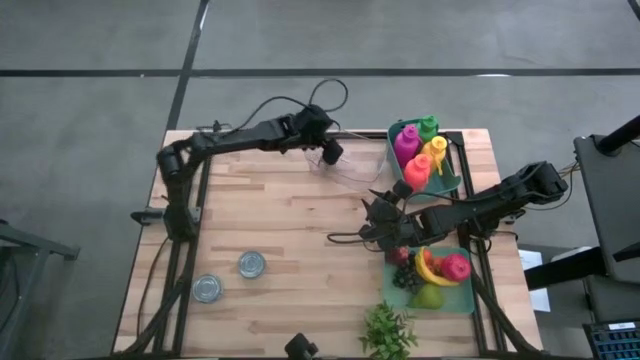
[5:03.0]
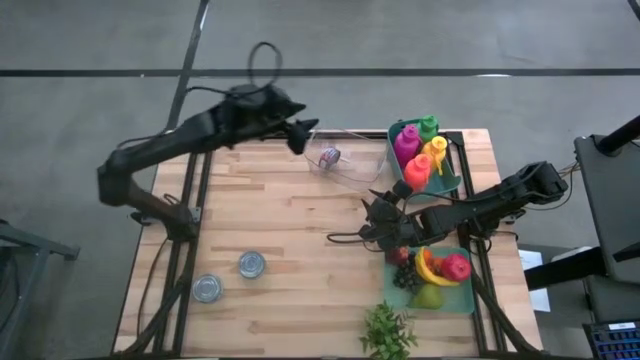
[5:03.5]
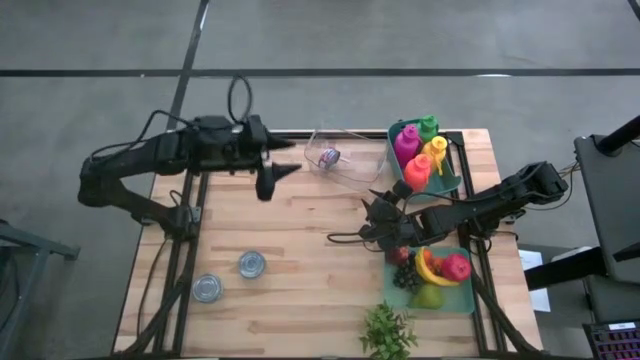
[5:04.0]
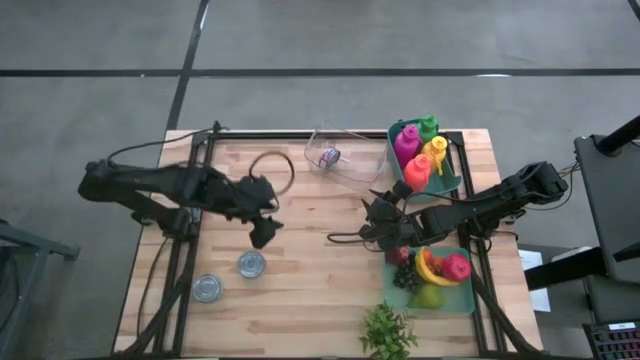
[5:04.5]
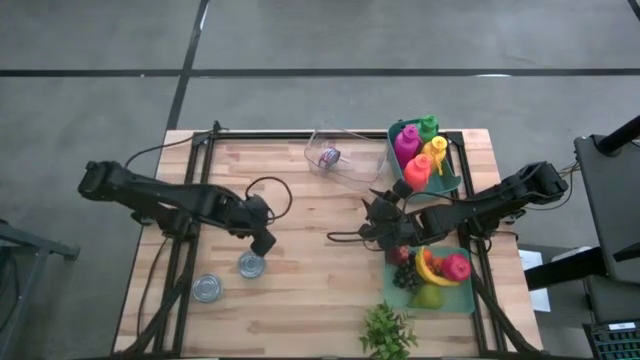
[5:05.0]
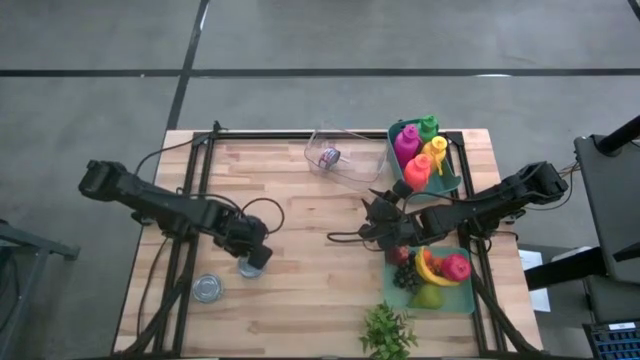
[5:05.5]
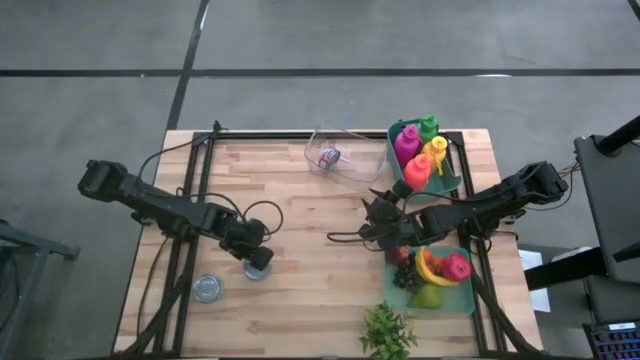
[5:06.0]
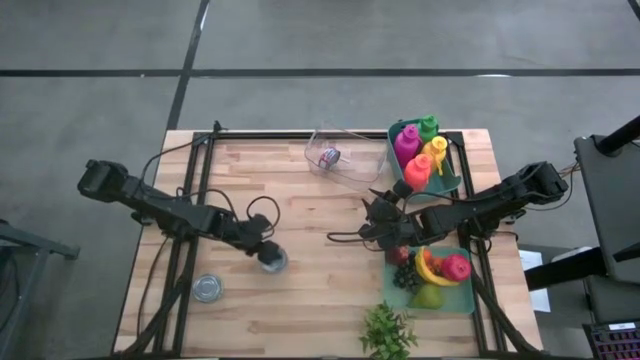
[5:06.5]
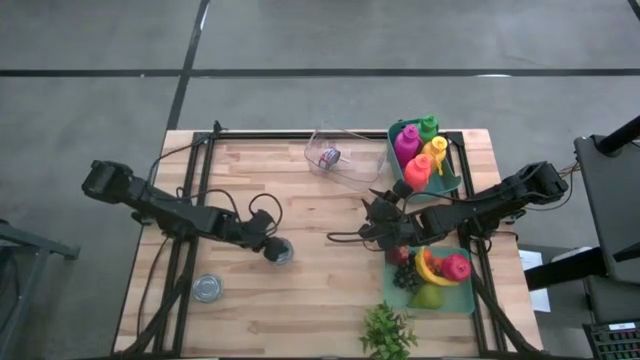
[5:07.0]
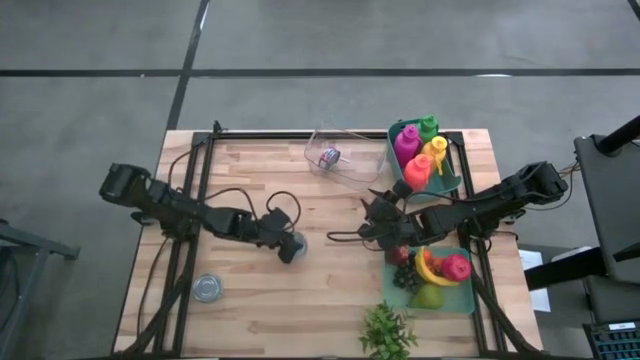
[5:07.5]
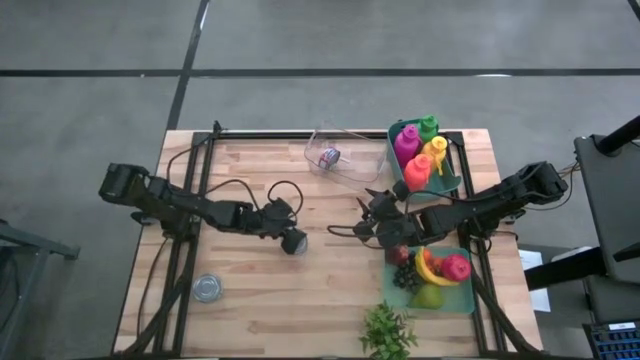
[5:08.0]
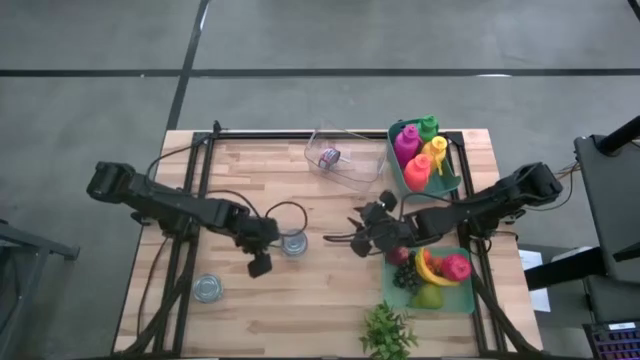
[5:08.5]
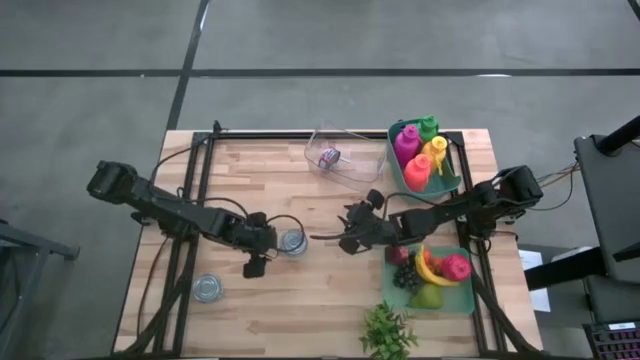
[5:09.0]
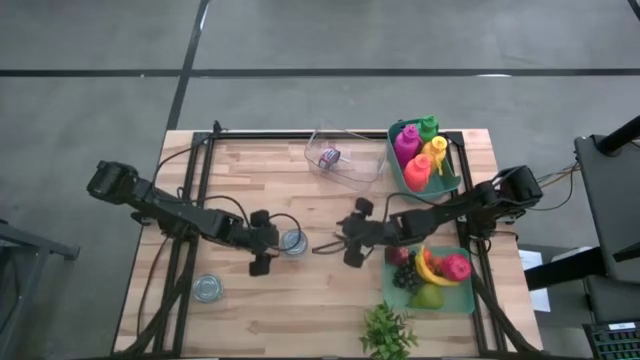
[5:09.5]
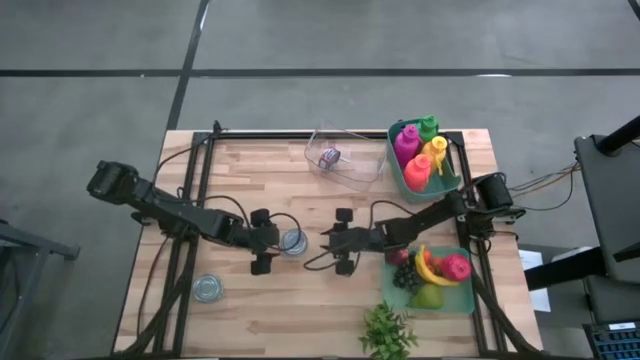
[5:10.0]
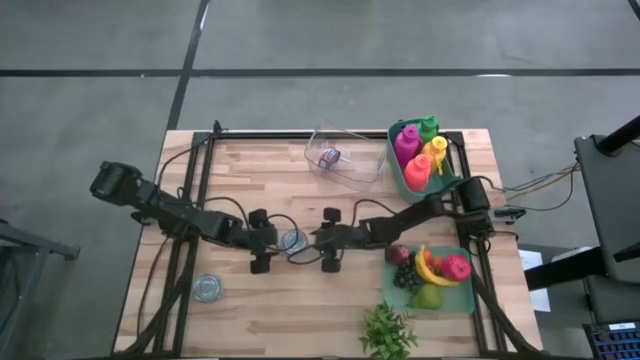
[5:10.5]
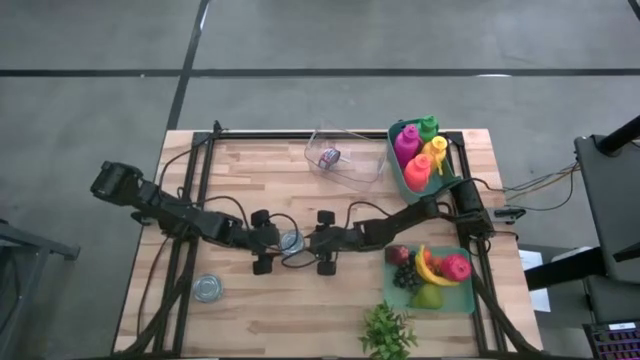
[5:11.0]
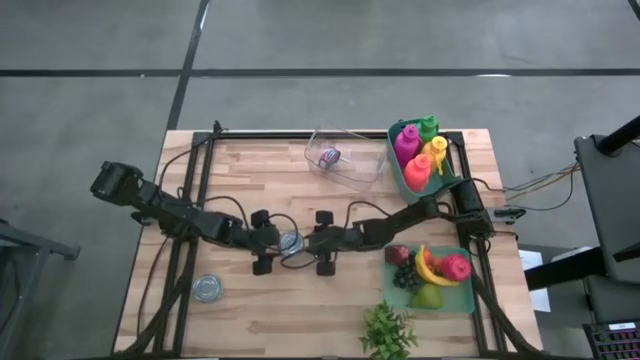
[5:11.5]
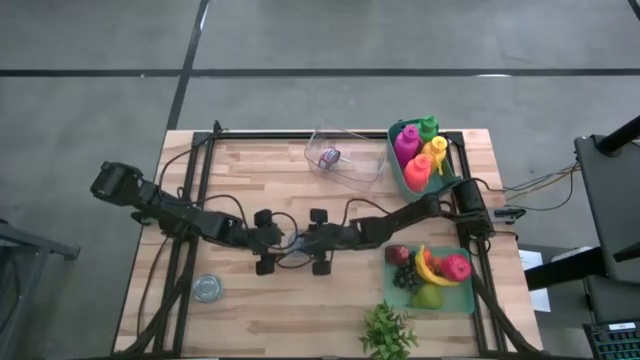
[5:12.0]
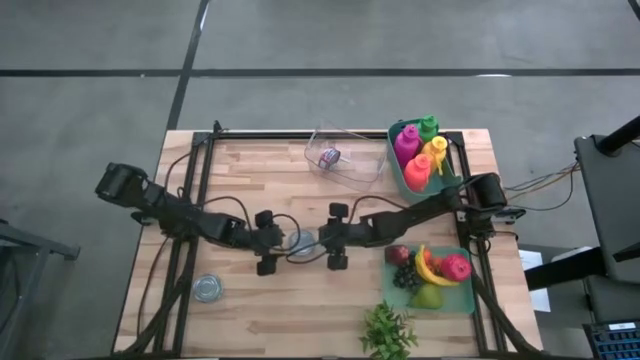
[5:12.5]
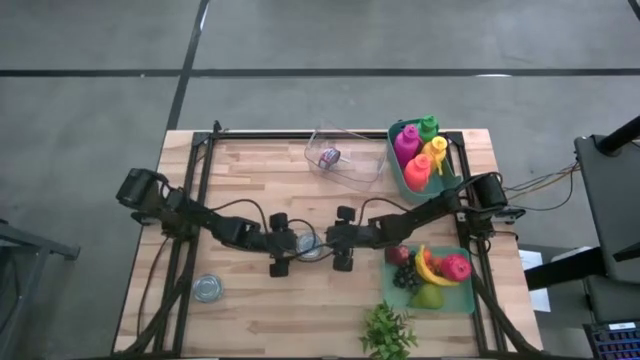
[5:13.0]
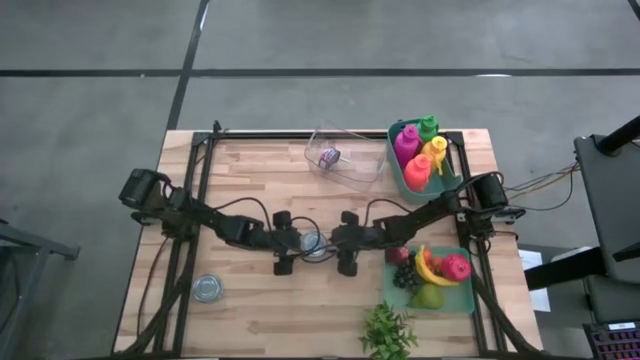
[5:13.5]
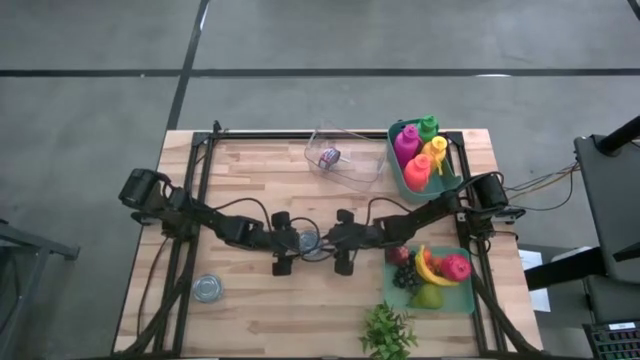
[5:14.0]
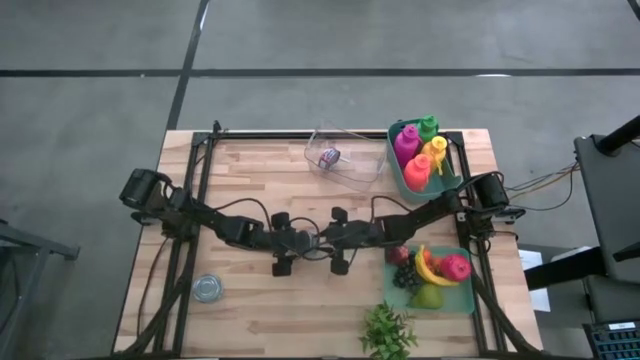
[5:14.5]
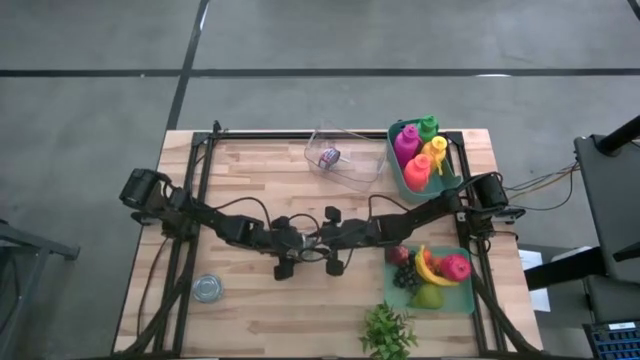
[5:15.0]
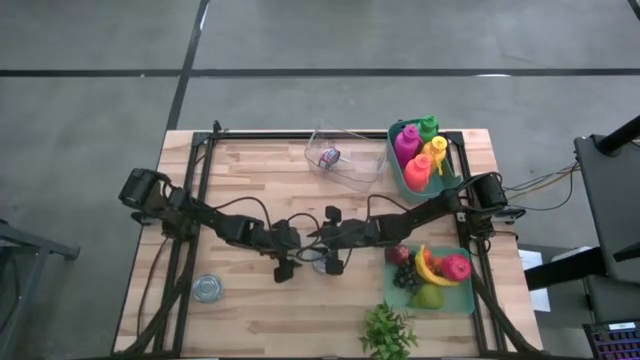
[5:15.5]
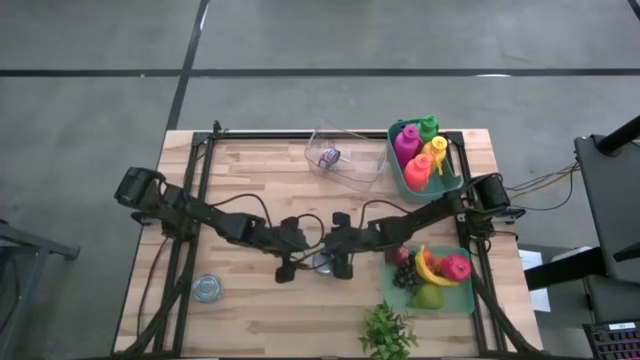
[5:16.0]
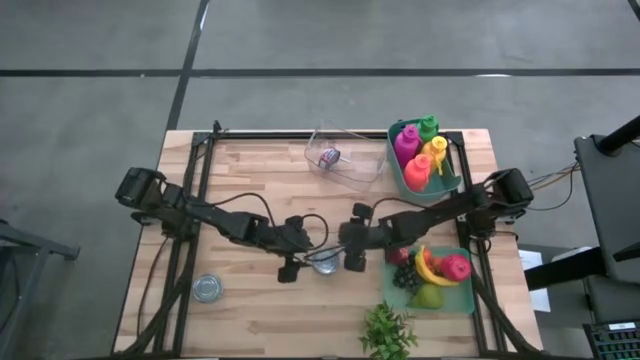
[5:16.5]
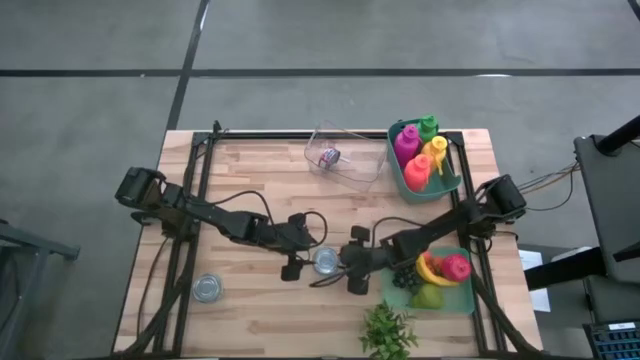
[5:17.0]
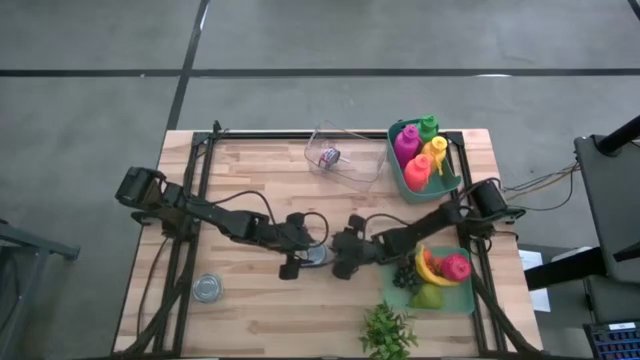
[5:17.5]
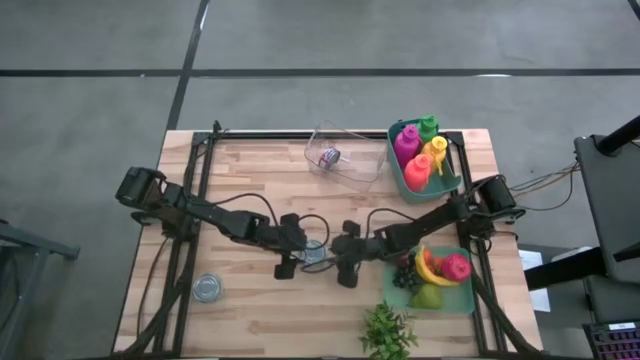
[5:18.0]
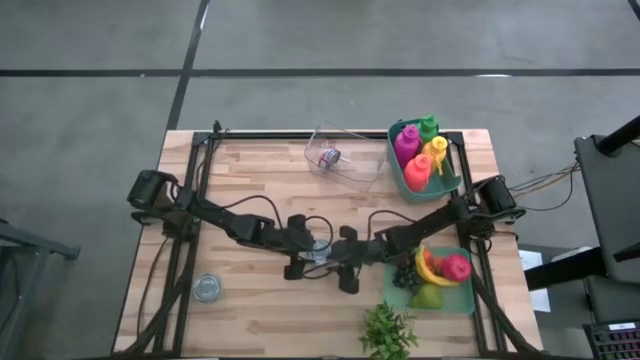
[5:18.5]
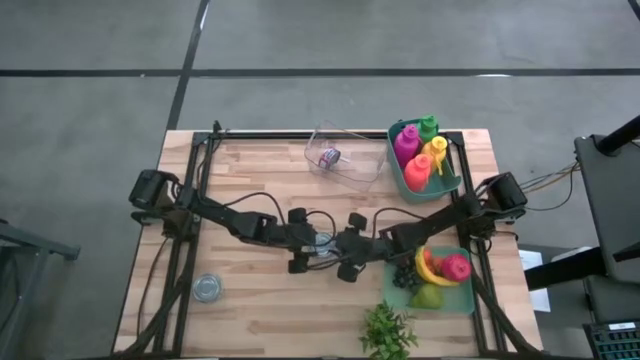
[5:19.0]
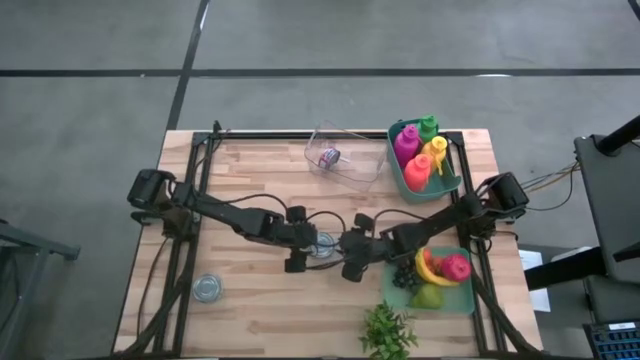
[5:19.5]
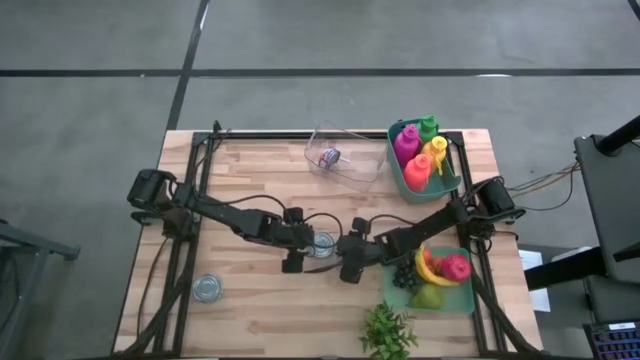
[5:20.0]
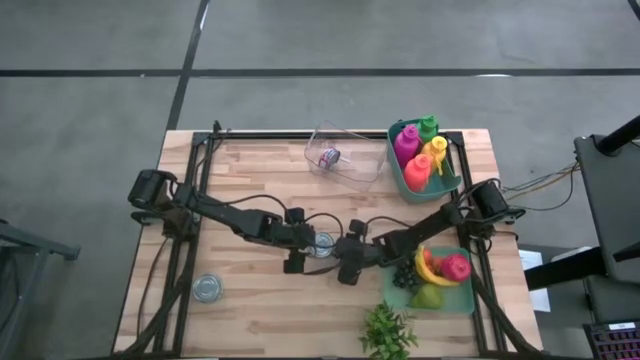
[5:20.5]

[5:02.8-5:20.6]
Task: Pick & Place Food Item
Put the right green tuna can into the transparent bin

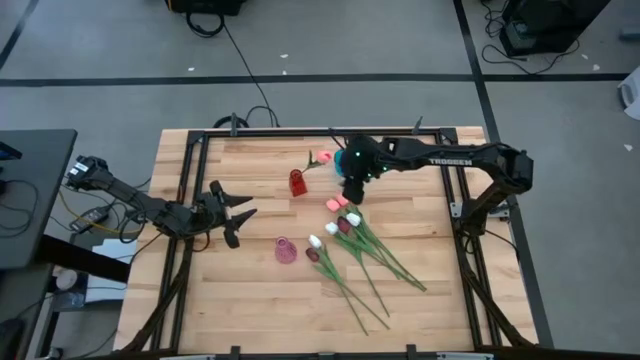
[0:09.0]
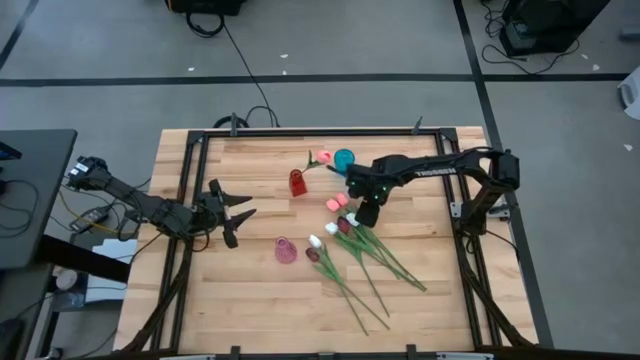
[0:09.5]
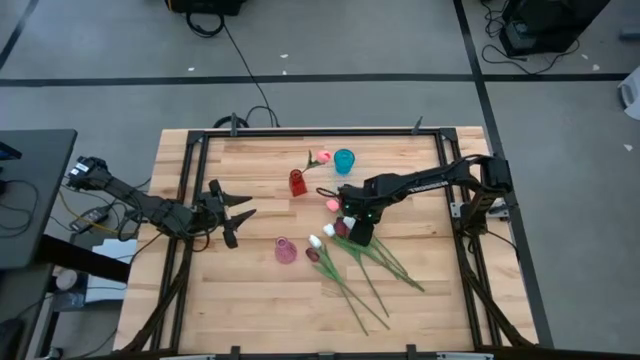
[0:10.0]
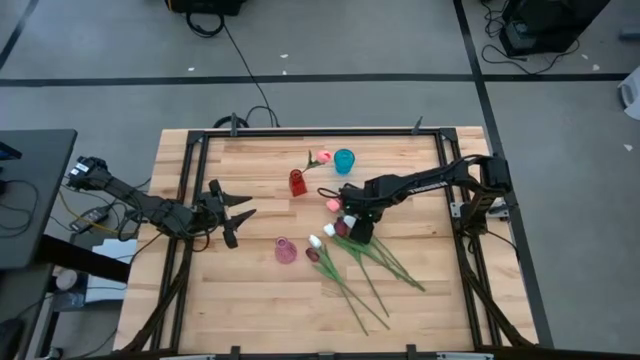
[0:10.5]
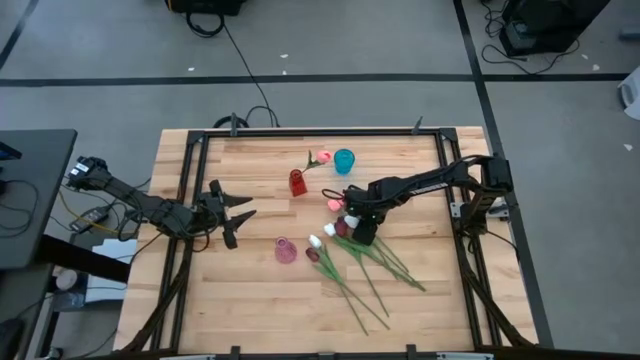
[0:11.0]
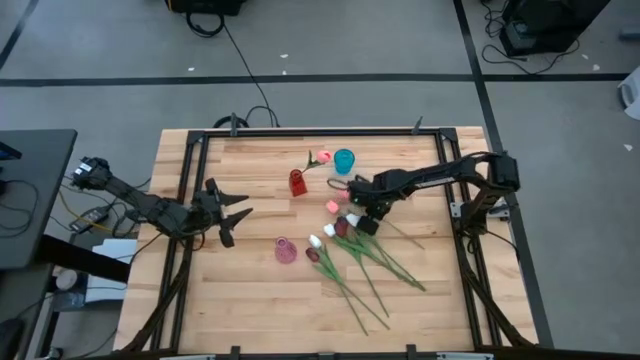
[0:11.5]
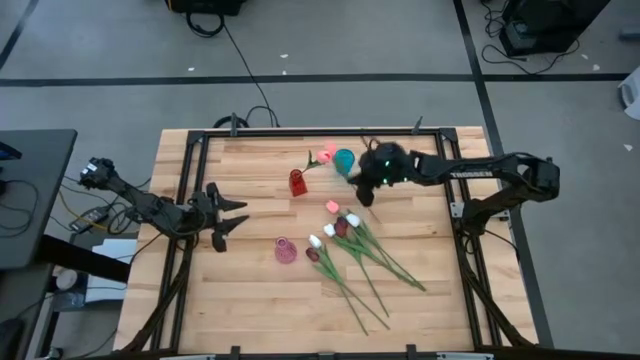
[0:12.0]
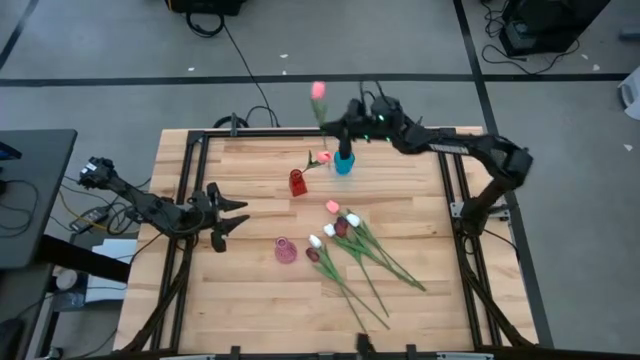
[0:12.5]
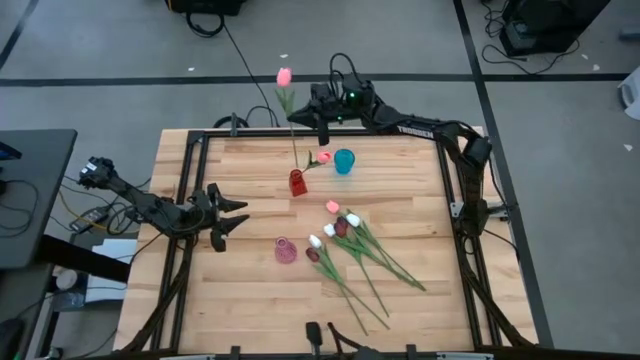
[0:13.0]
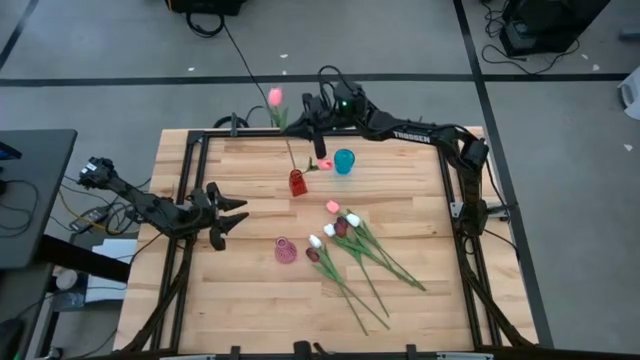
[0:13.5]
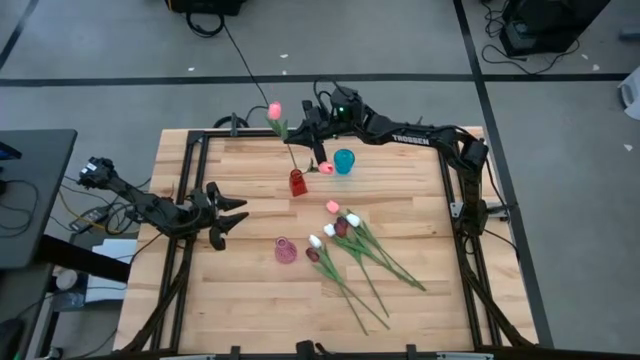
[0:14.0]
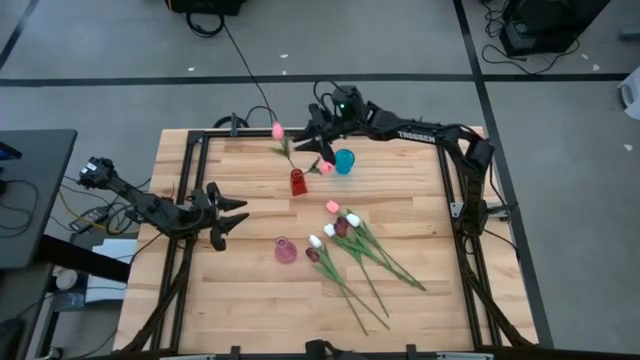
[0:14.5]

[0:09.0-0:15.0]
Task: Sort flowers into vase by color
Put the pink flower into the red vase
